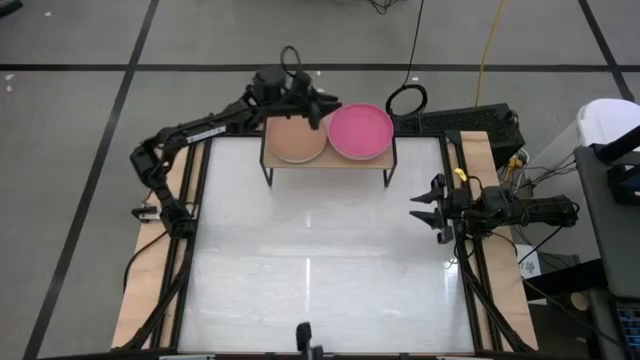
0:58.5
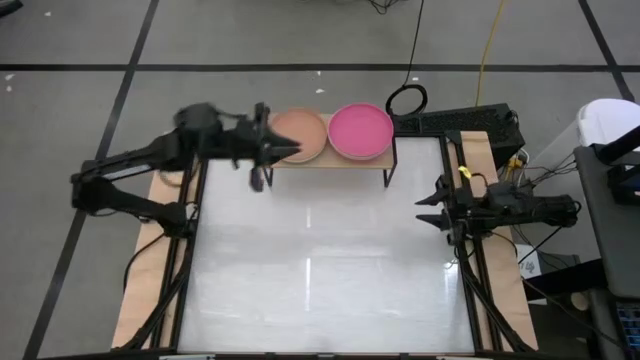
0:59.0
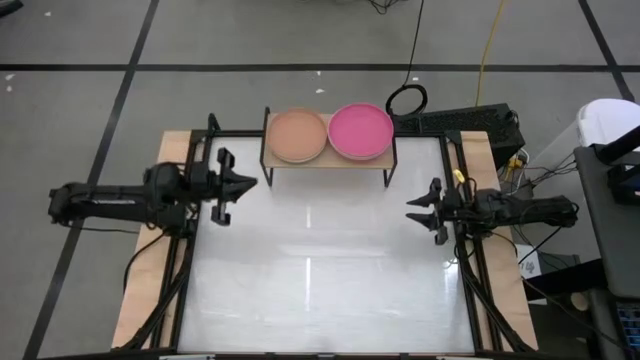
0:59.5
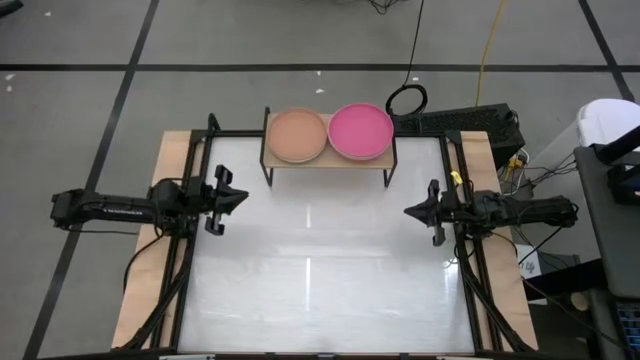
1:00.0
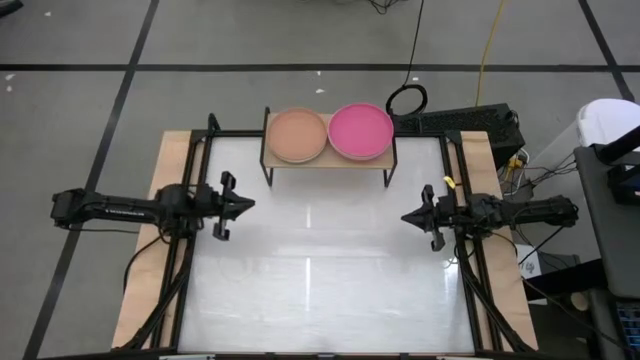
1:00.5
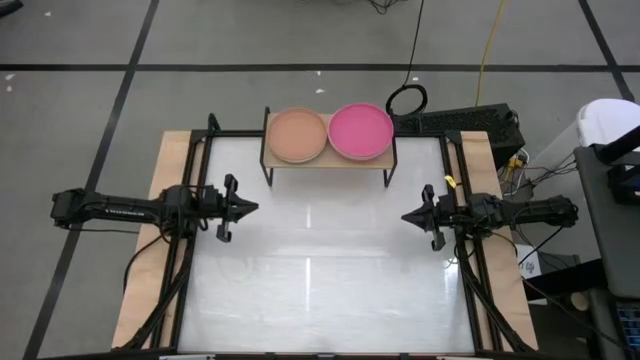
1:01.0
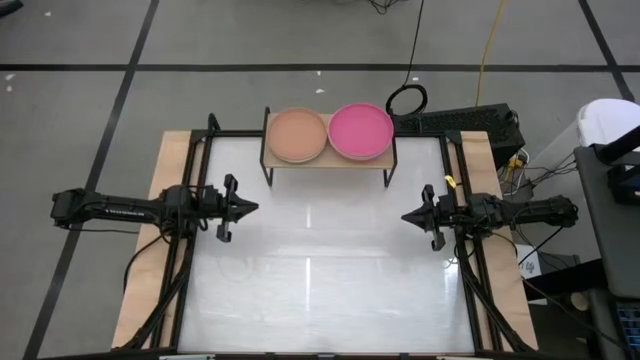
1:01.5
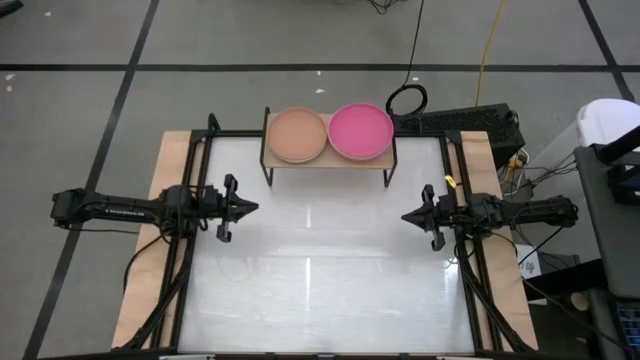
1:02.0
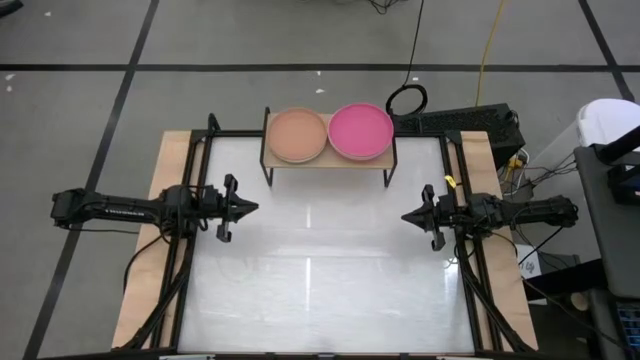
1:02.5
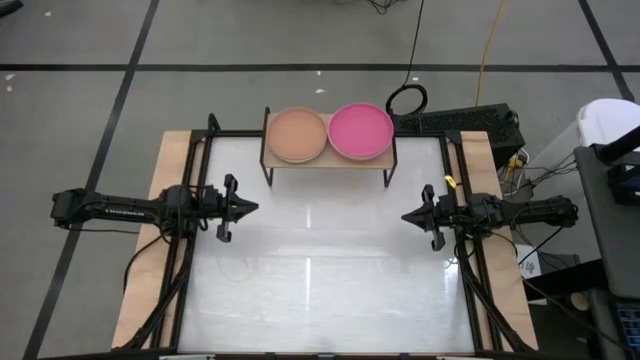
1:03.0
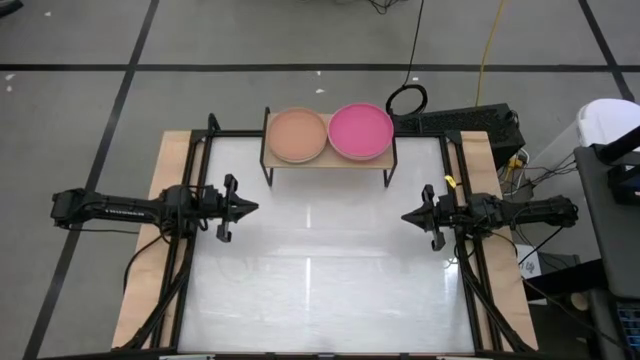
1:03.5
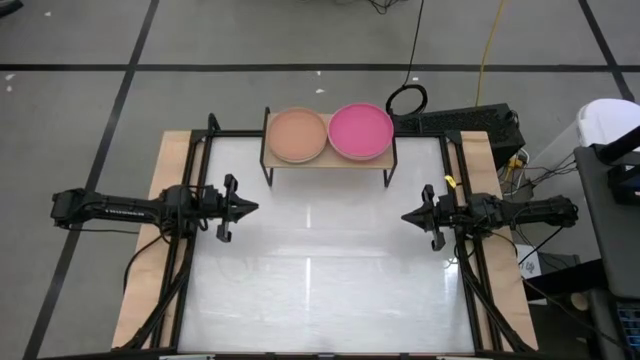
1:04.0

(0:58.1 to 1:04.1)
Task: Place and stack plates onto a shelf
Return to Home Position

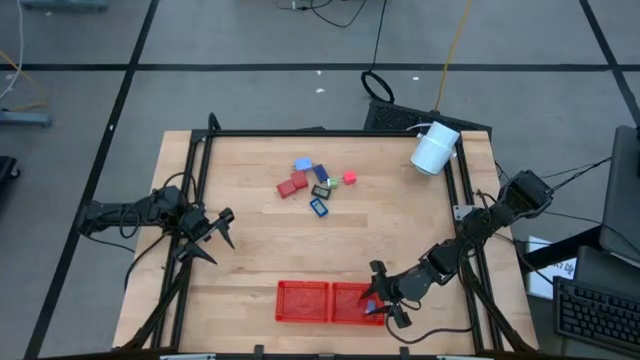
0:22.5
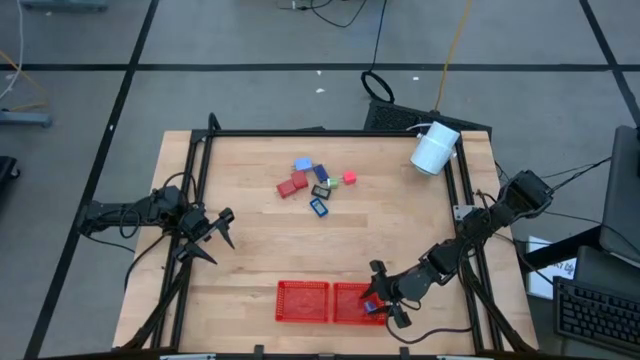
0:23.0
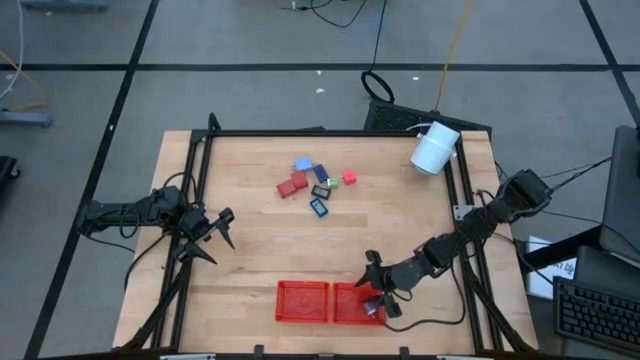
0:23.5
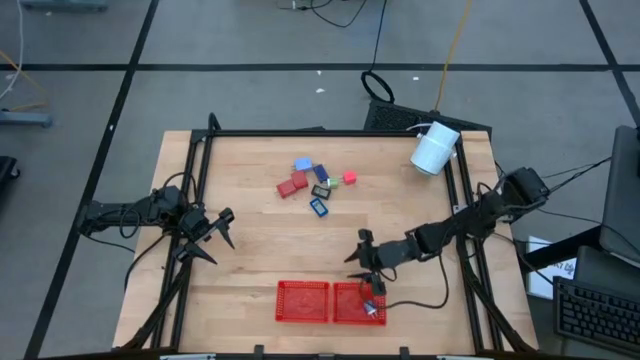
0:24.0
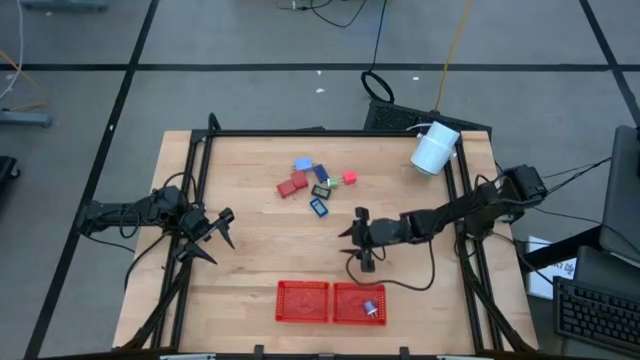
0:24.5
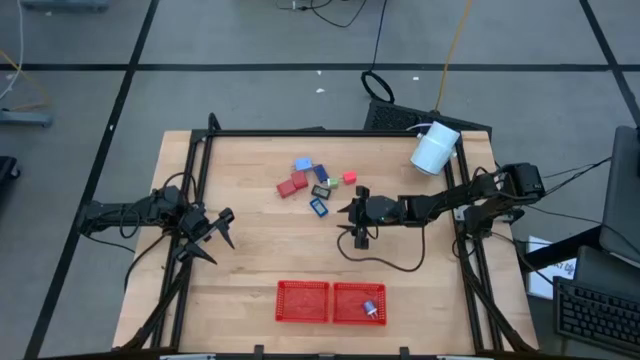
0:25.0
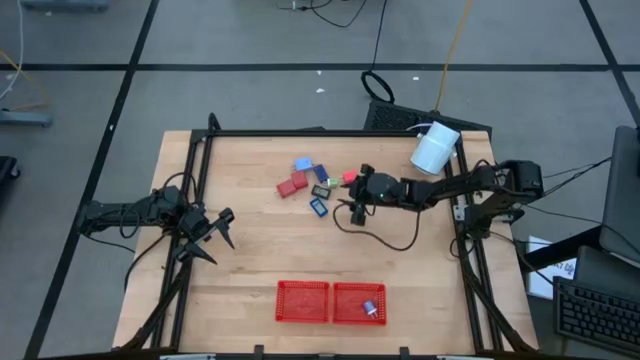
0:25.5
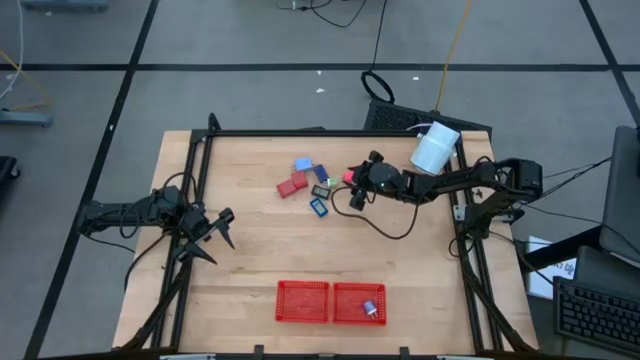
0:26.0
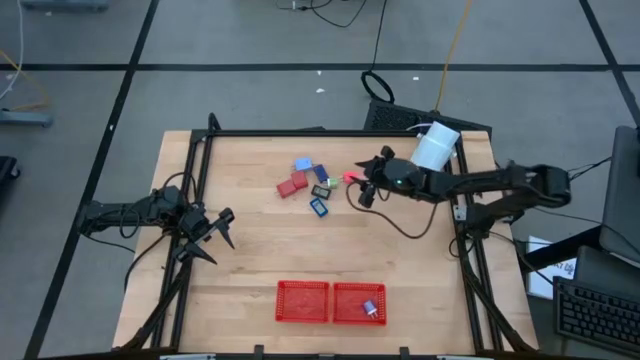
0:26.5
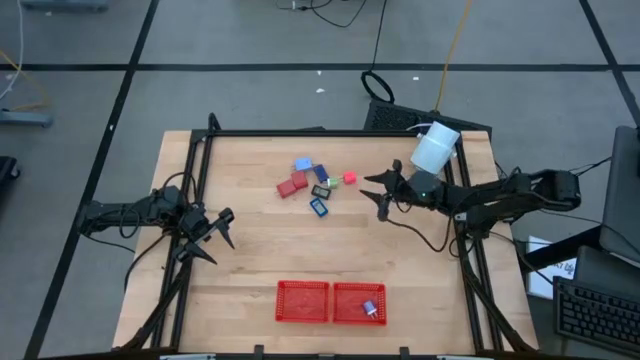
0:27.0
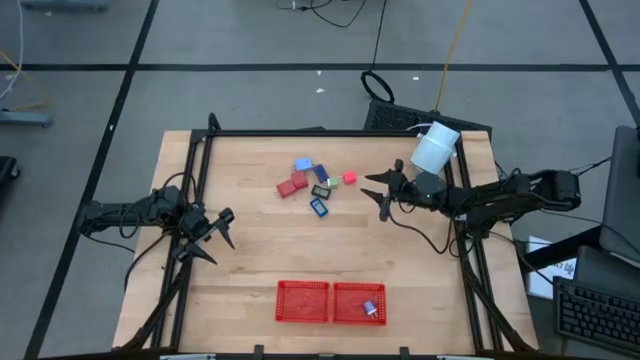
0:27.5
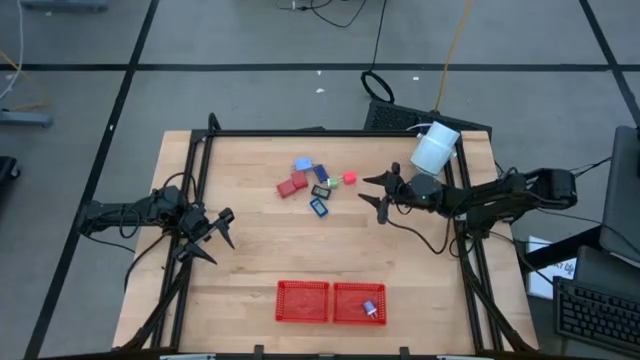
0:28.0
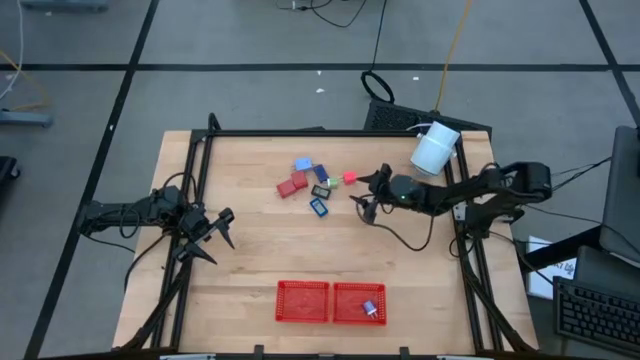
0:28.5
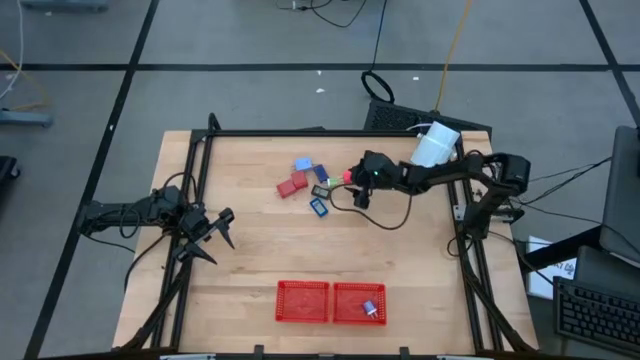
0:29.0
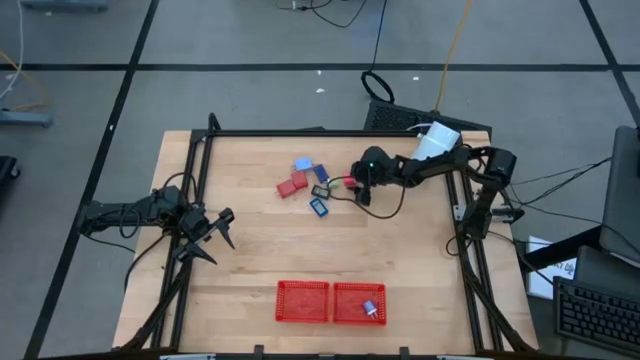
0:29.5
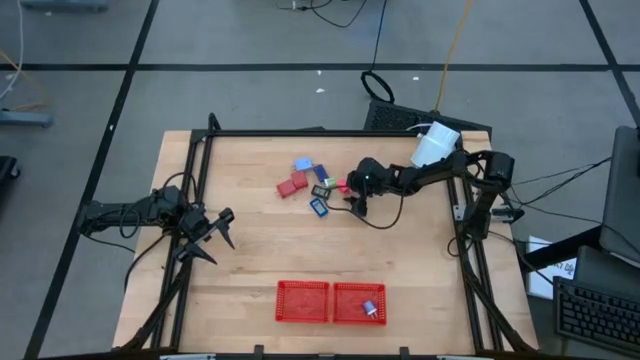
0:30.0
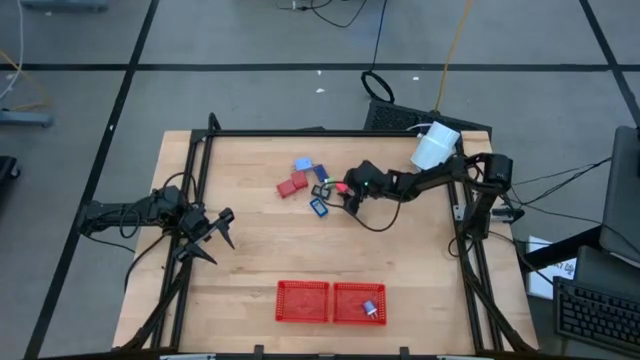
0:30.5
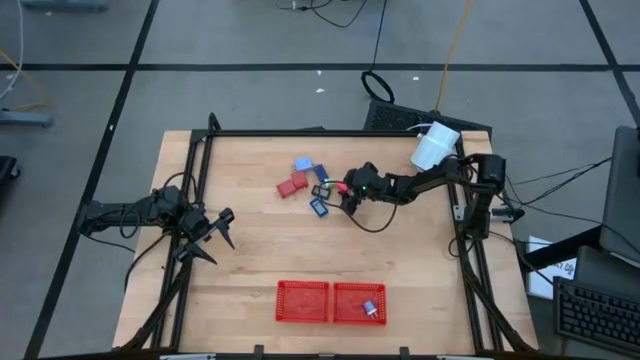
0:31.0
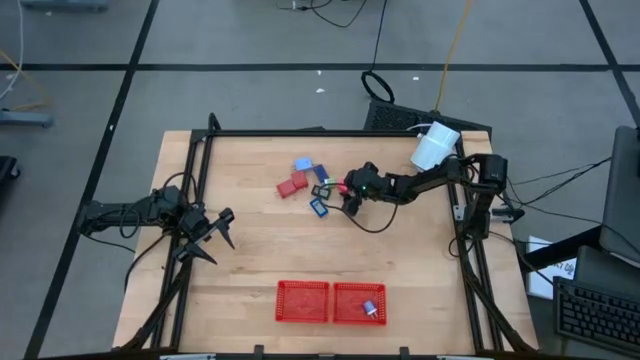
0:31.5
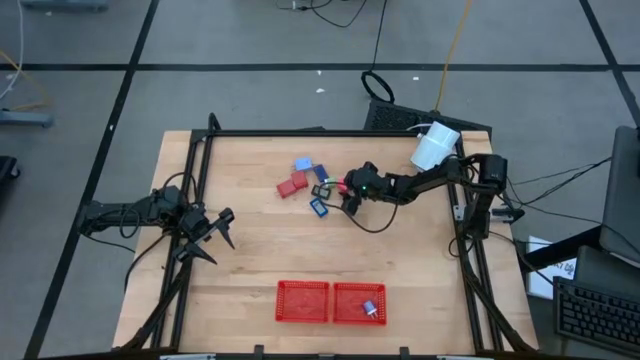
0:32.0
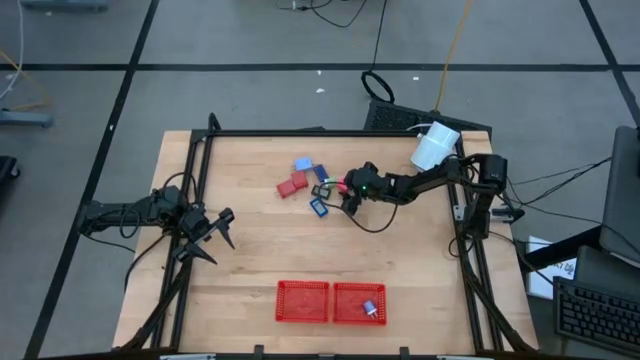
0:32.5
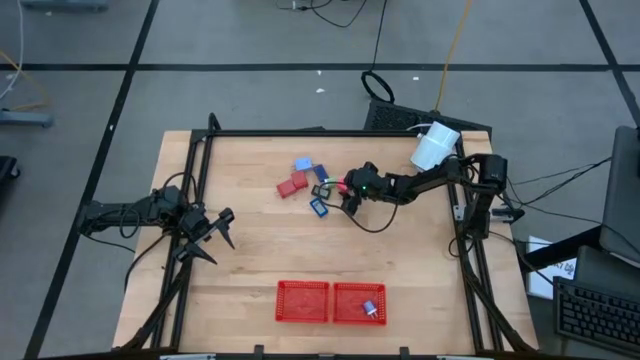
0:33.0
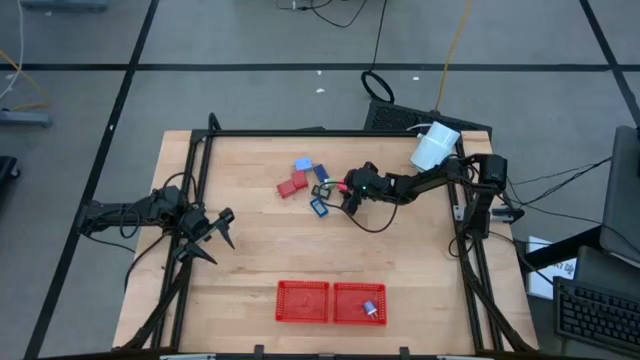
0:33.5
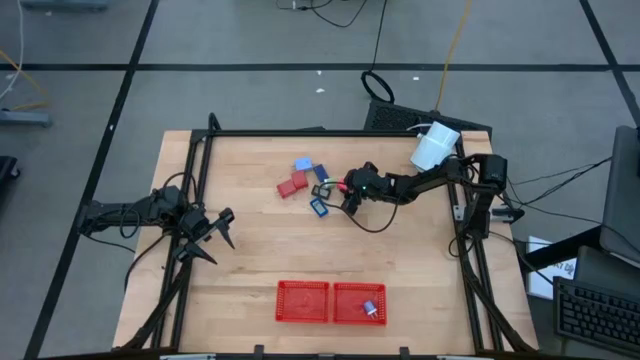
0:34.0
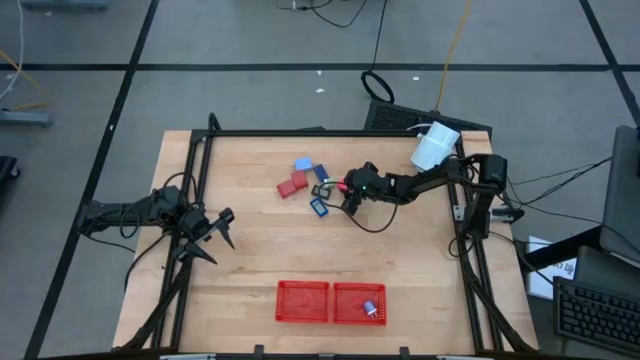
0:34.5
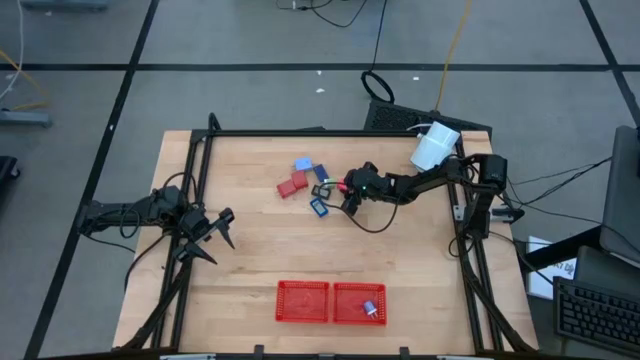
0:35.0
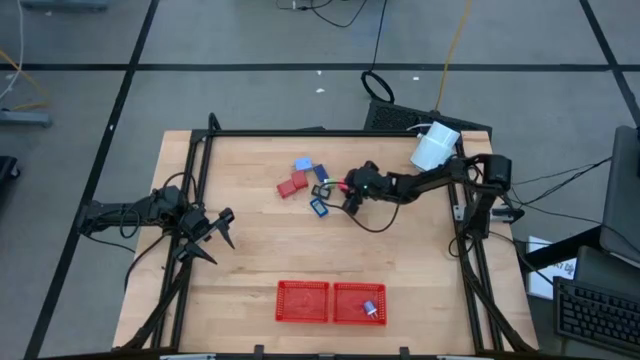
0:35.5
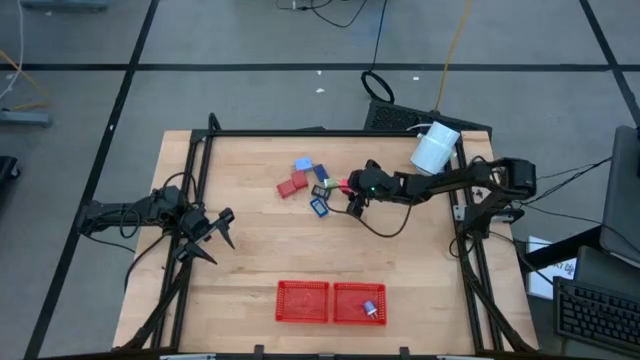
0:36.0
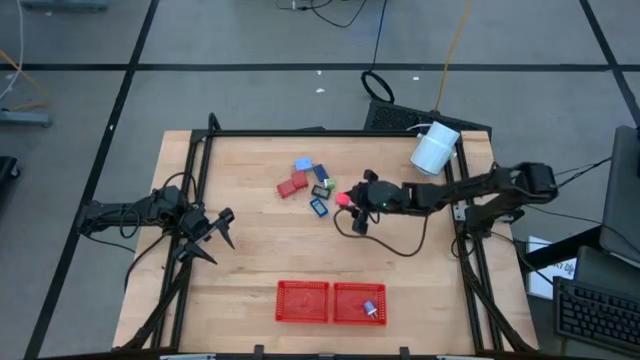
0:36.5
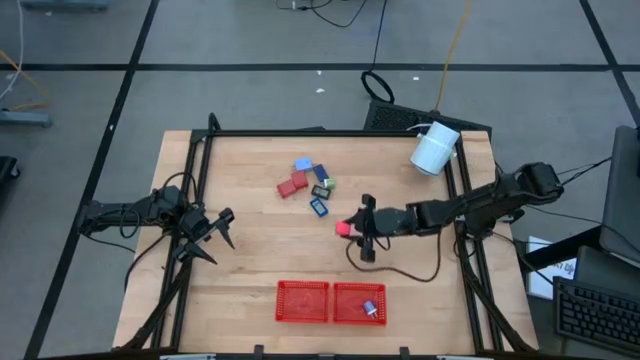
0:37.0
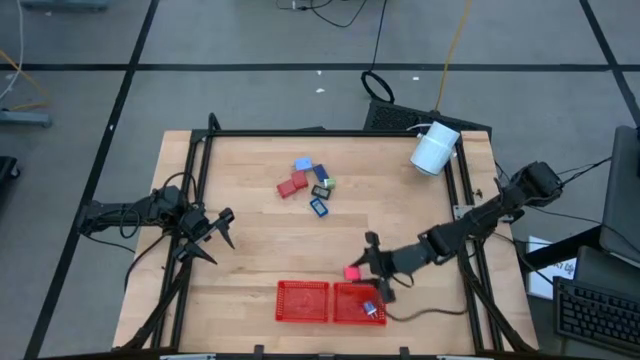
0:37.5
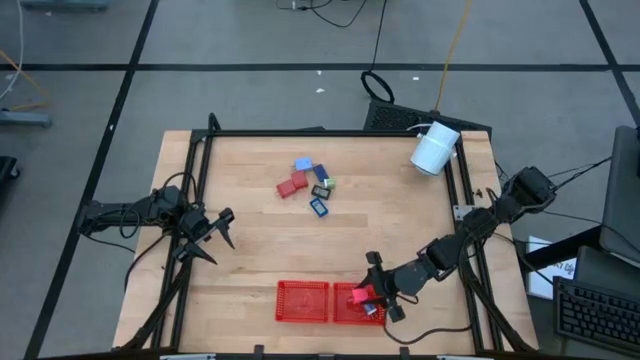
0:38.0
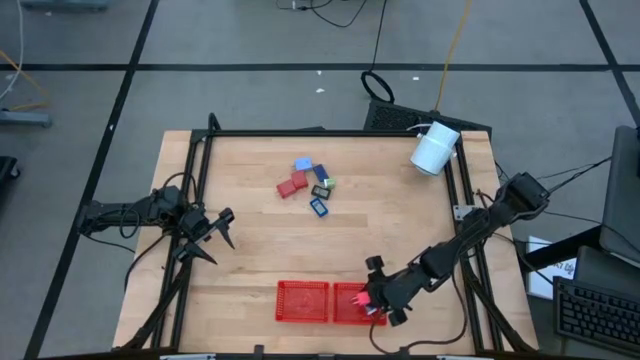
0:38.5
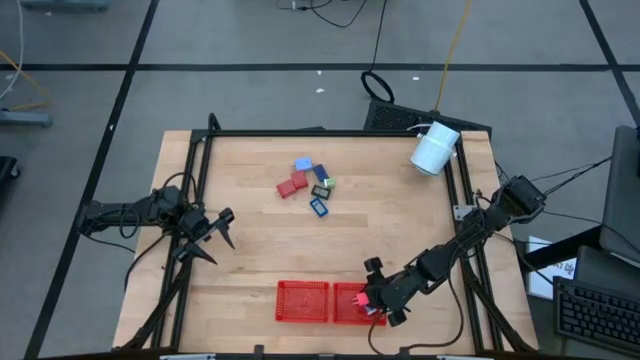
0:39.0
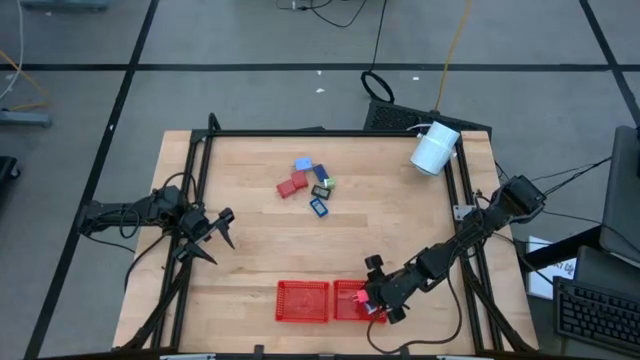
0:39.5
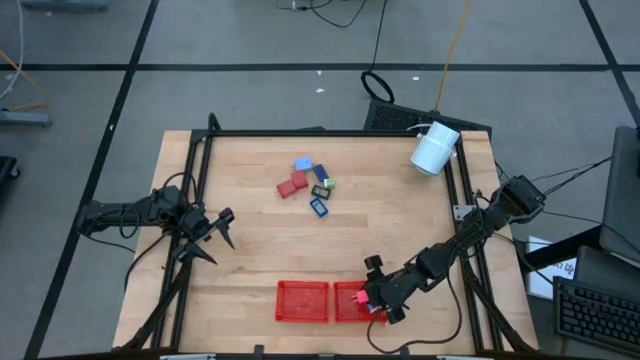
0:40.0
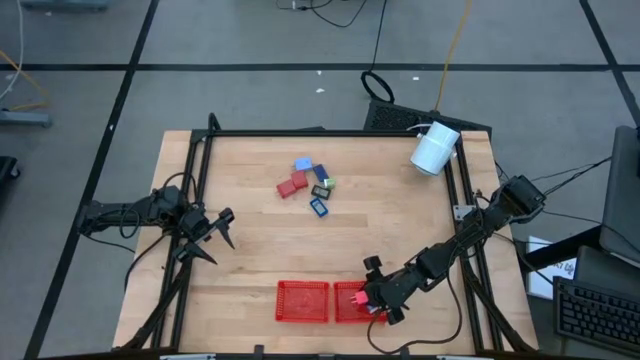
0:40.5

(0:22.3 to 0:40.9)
Task: Pick & Place Office items
Put the pink charger adapter into the right red bin
